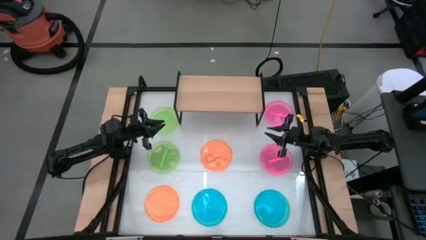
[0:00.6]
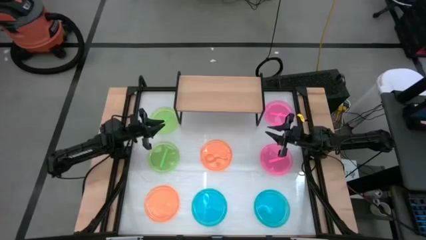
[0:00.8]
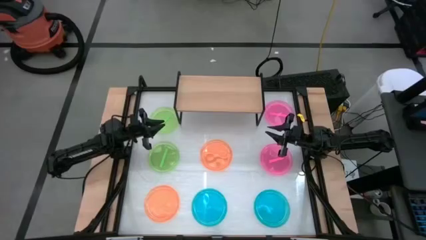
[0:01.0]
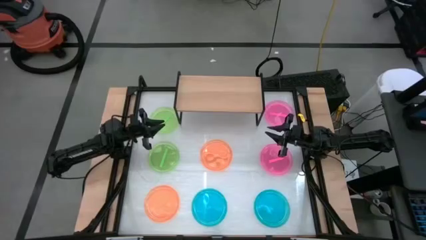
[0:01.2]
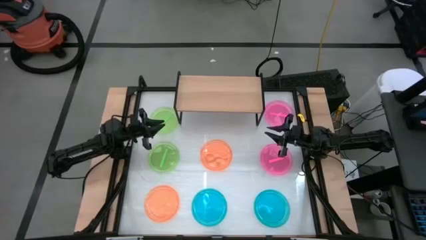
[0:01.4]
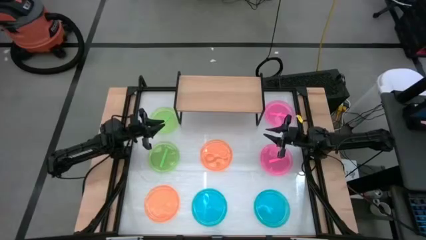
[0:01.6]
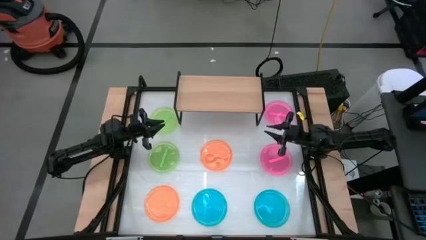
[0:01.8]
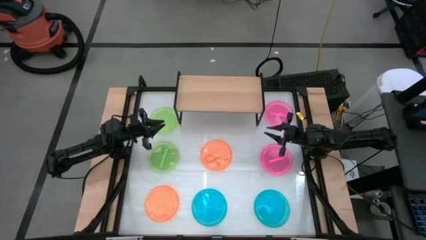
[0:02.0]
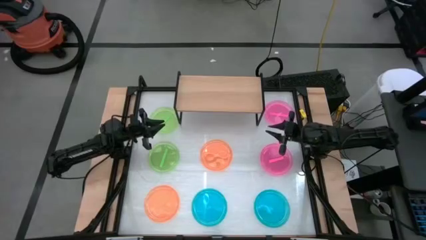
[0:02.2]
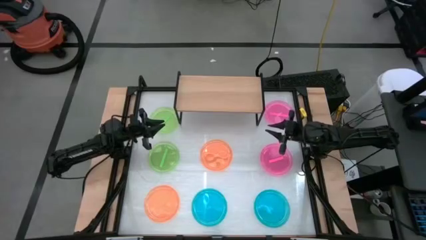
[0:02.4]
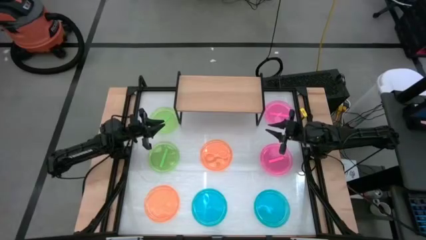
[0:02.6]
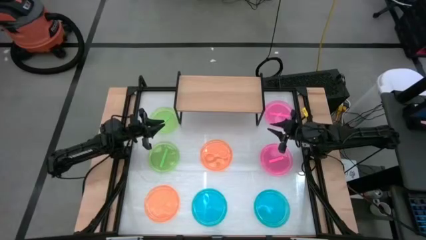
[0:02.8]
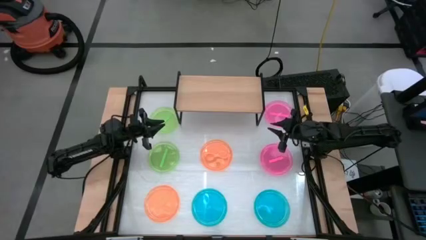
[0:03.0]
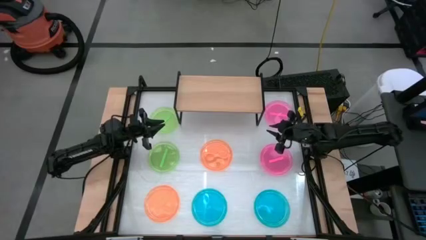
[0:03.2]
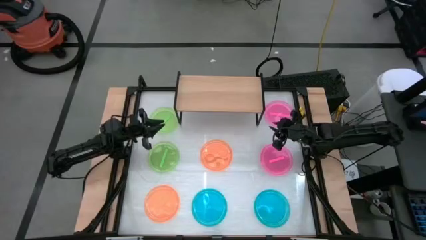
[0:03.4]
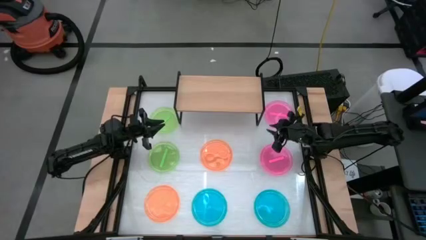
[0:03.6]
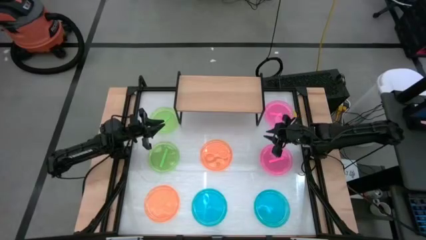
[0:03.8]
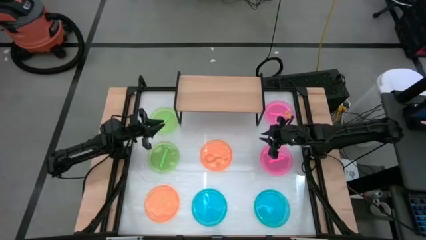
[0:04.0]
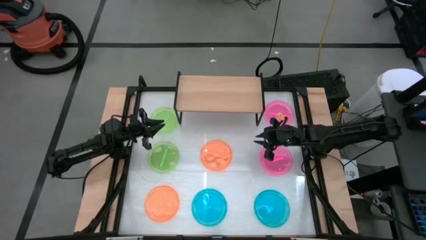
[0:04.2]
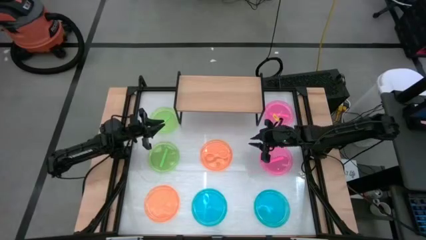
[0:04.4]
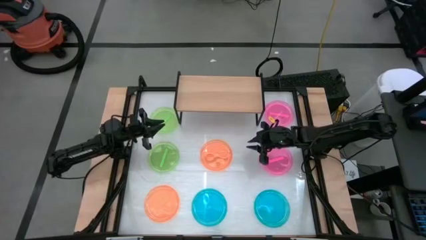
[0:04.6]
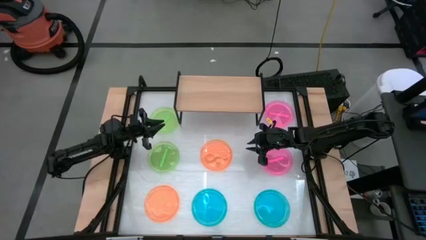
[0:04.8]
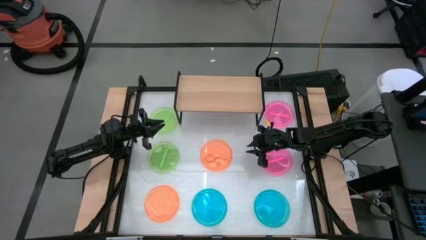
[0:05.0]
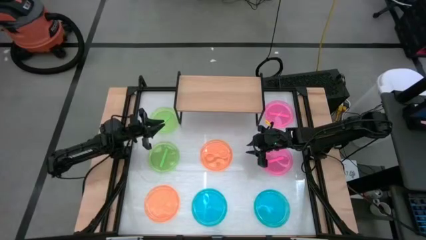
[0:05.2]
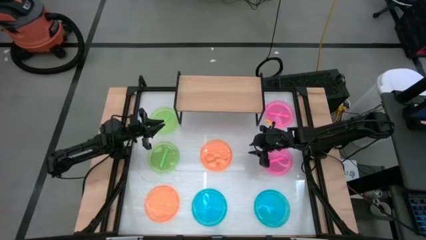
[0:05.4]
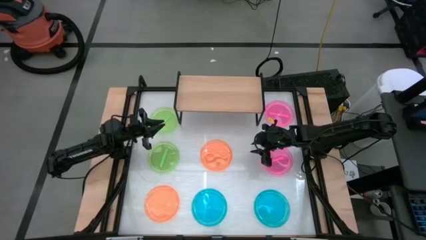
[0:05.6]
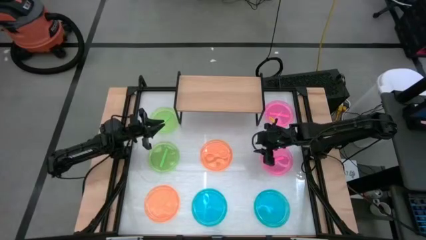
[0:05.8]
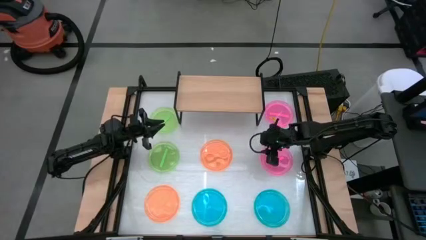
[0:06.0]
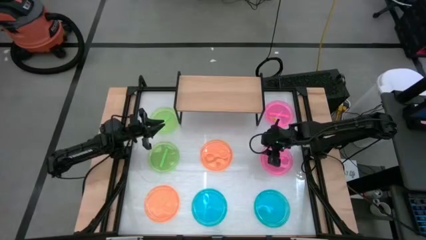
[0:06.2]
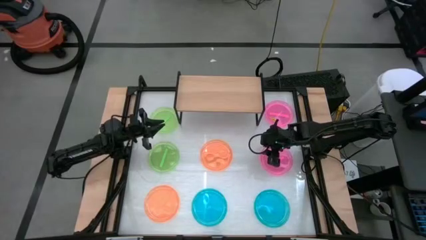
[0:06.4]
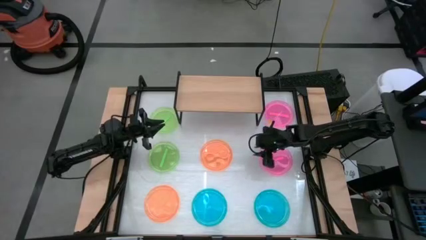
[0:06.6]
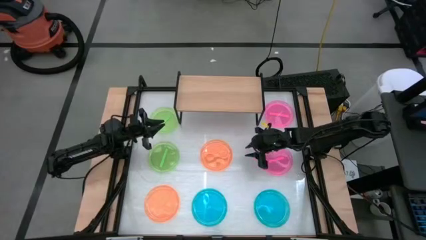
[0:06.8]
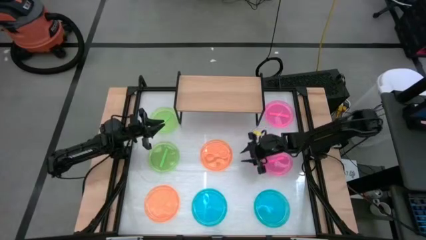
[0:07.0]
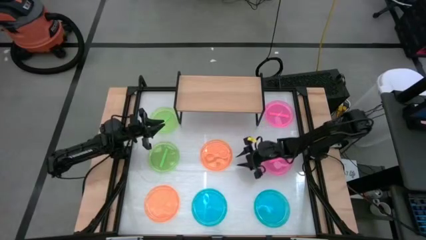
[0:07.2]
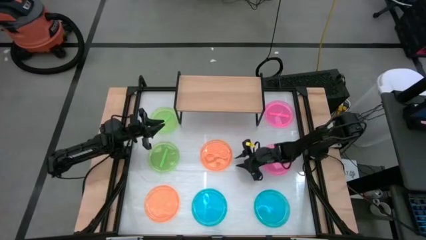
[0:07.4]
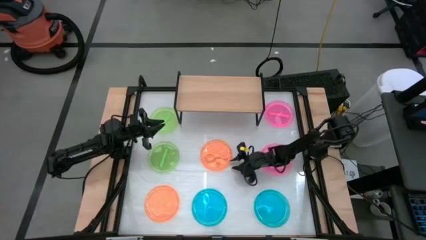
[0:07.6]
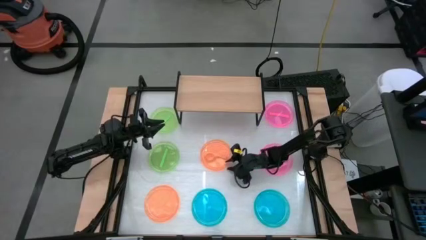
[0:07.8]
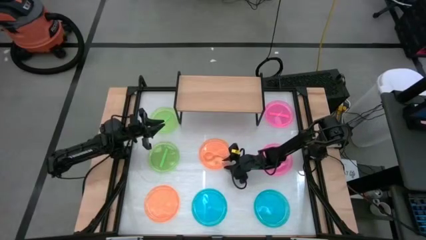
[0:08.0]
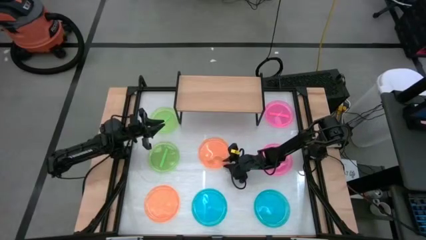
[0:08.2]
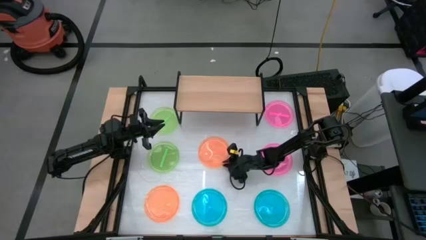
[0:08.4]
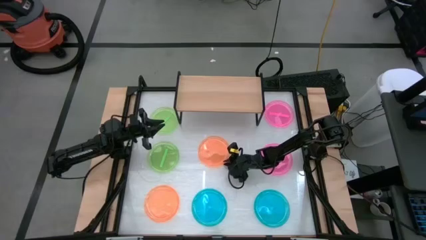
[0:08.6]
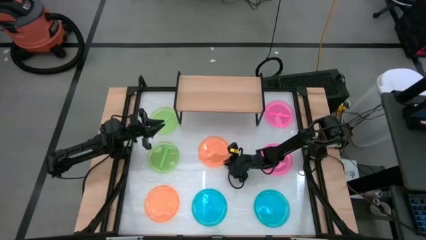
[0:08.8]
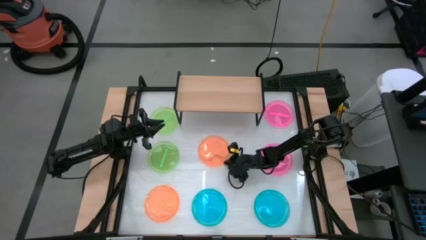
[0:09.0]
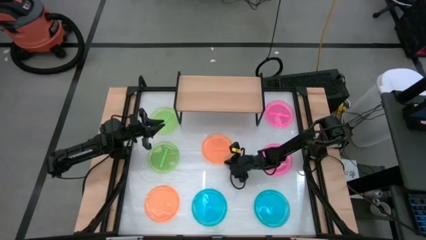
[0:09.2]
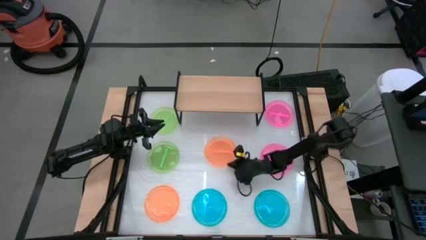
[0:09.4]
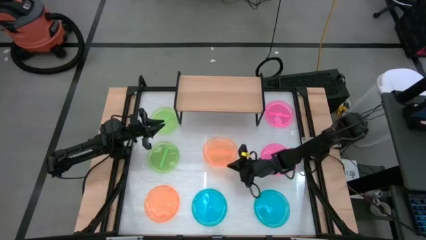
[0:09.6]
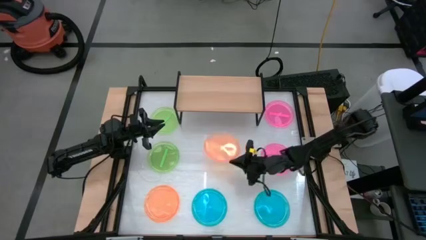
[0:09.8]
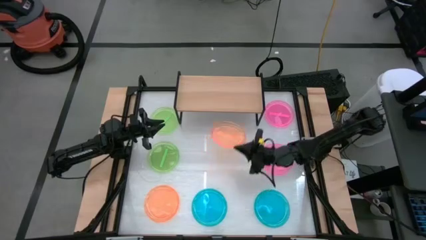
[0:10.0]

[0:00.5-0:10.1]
Task: Place and stack plates onto a shelf
Put the top orange plate on the shelf

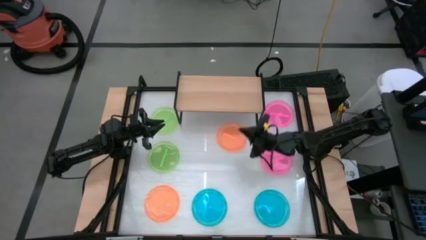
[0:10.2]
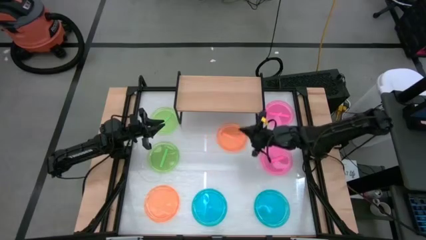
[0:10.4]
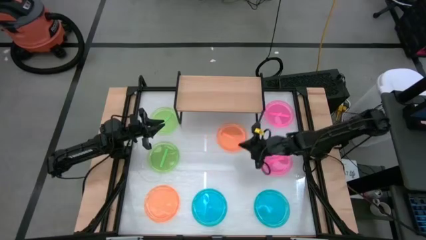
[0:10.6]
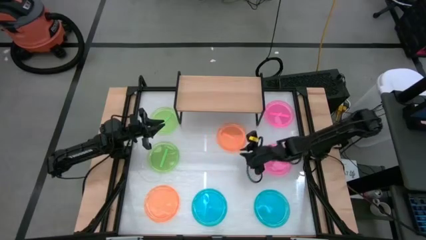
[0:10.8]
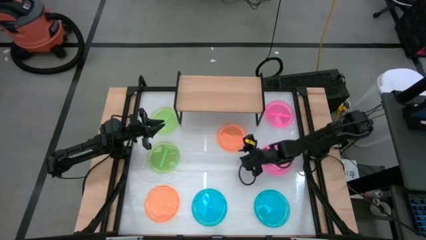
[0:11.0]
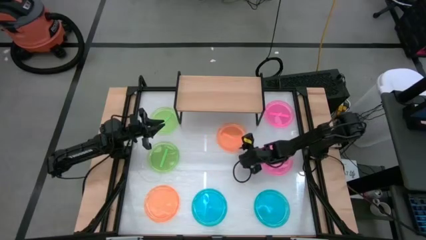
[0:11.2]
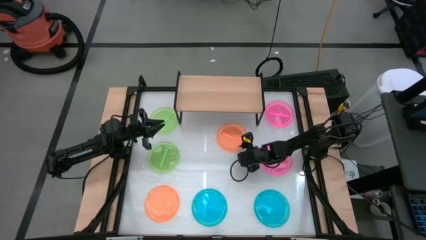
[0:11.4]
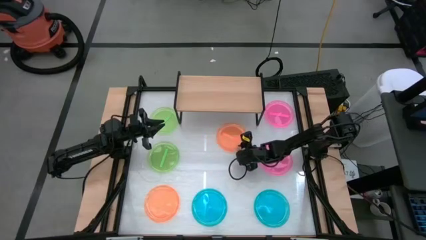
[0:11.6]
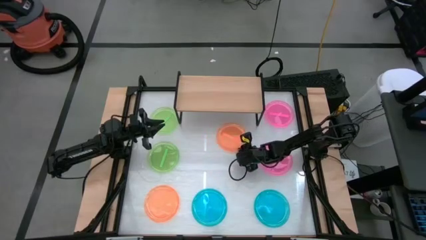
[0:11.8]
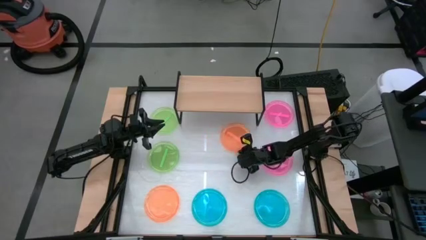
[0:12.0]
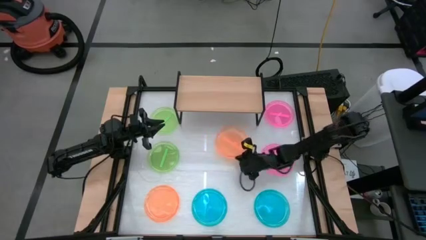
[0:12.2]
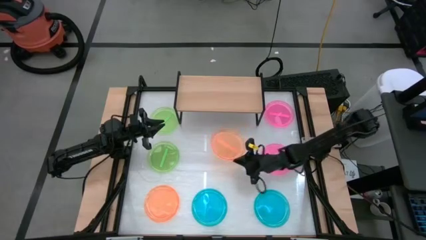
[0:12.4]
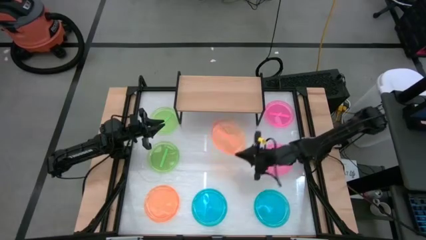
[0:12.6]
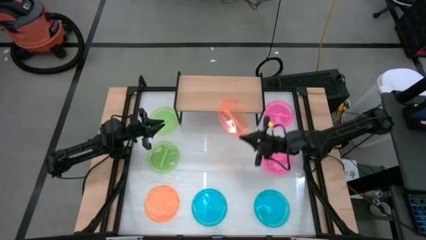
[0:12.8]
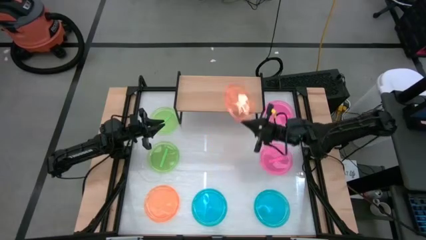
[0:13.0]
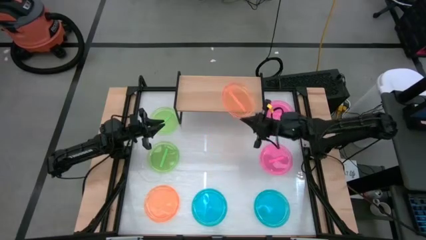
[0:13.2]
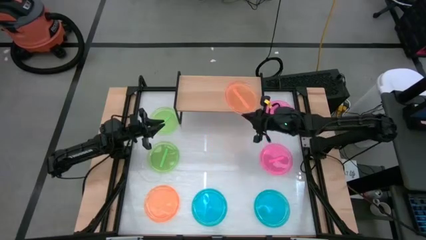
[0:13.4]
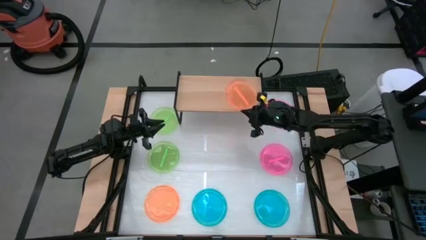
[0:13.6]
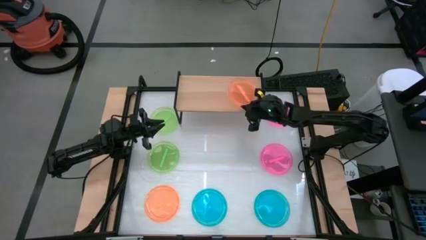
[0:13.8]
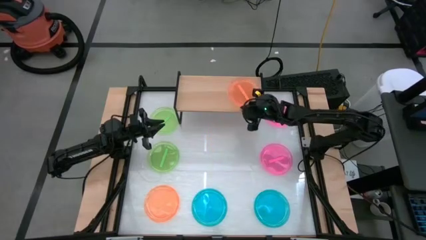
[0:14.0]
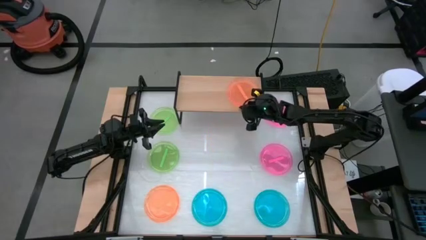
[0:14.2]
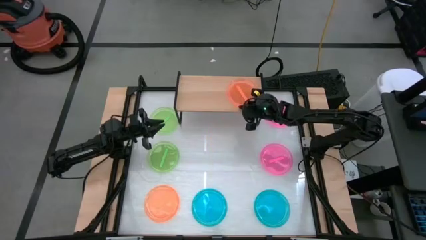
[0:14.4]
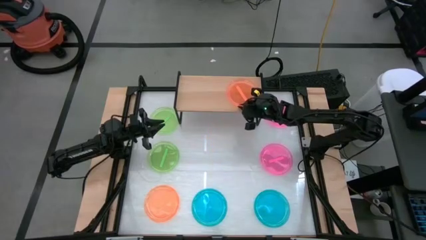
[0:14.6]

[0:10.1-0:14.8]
Put the top orange plate on the shelf
